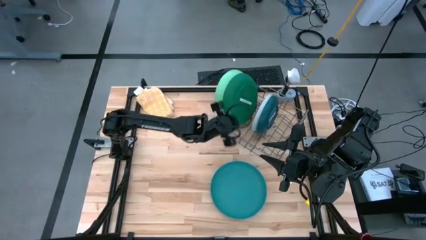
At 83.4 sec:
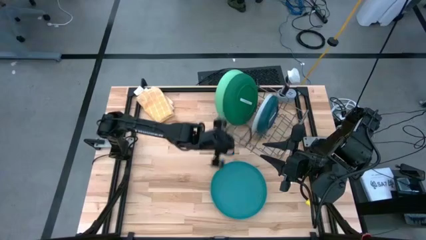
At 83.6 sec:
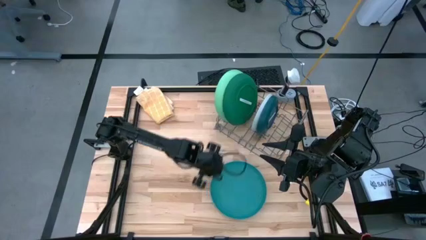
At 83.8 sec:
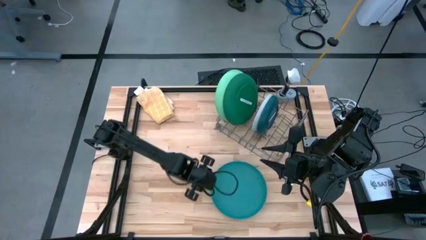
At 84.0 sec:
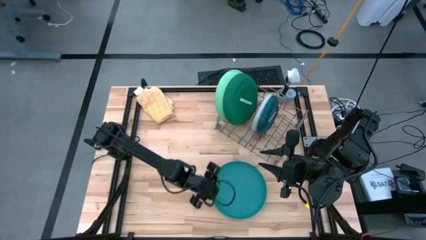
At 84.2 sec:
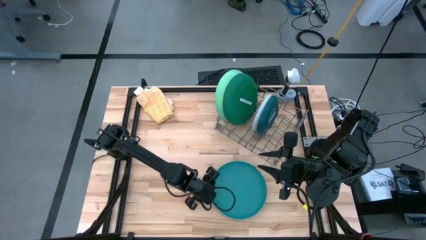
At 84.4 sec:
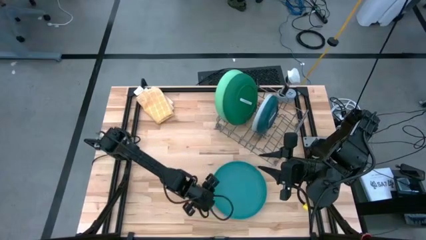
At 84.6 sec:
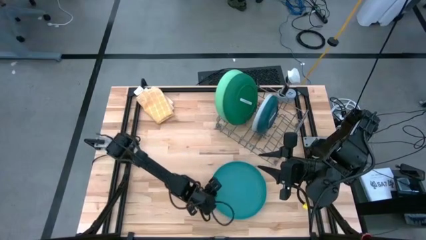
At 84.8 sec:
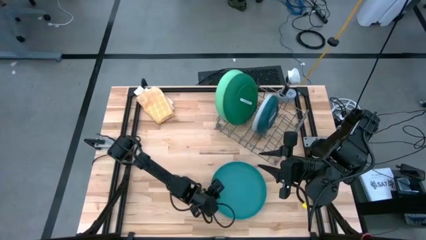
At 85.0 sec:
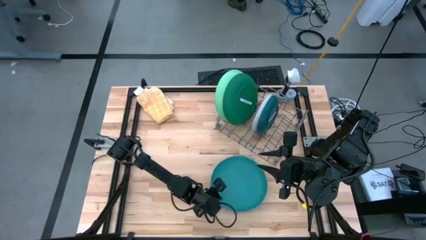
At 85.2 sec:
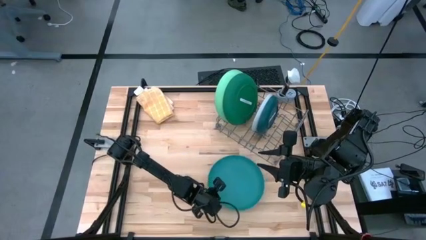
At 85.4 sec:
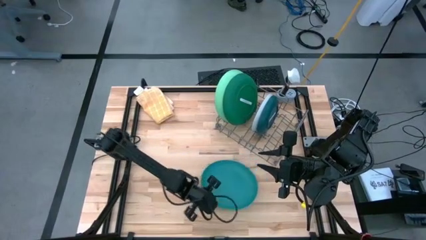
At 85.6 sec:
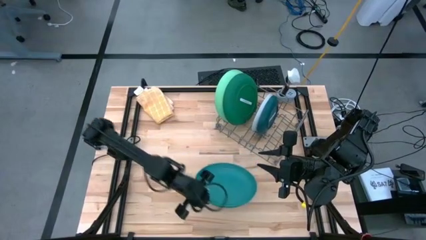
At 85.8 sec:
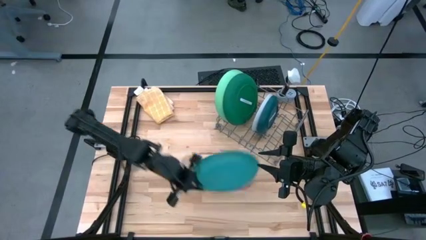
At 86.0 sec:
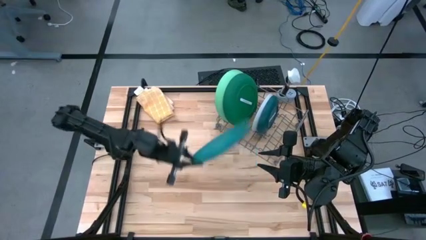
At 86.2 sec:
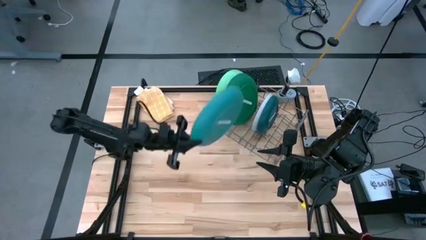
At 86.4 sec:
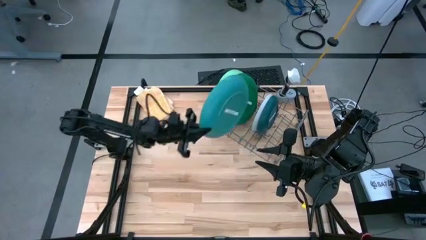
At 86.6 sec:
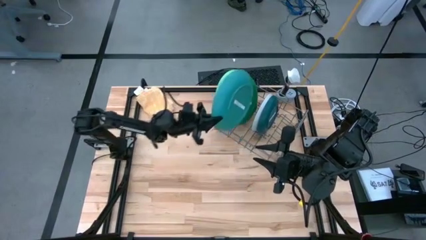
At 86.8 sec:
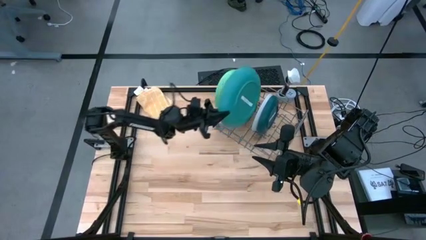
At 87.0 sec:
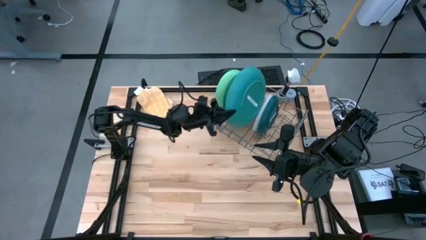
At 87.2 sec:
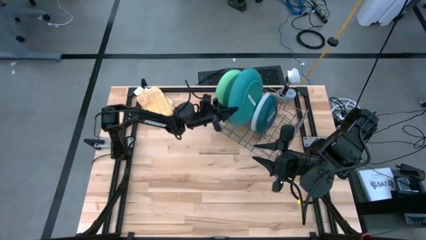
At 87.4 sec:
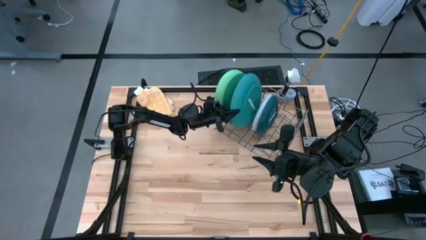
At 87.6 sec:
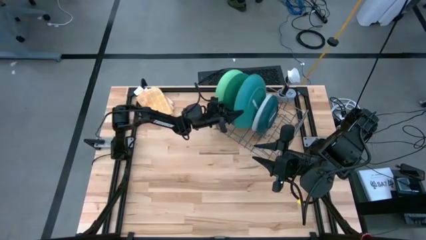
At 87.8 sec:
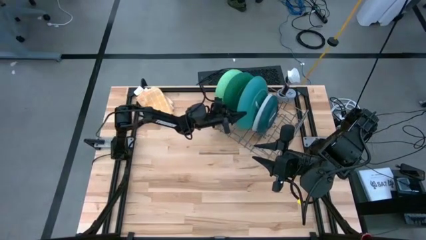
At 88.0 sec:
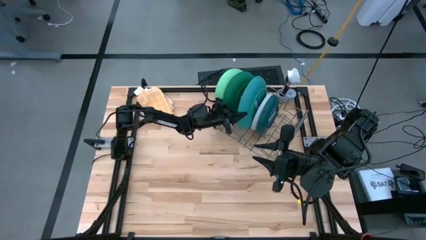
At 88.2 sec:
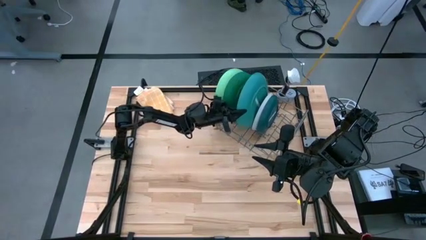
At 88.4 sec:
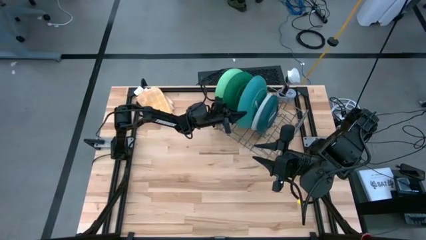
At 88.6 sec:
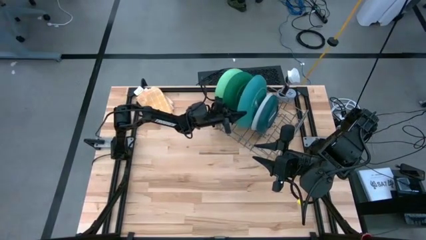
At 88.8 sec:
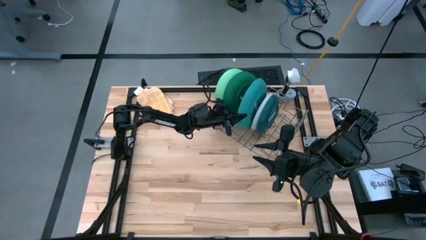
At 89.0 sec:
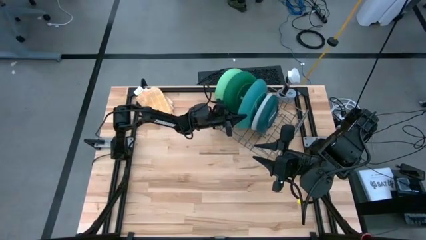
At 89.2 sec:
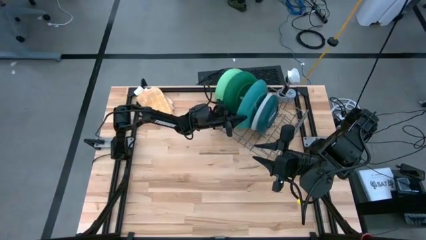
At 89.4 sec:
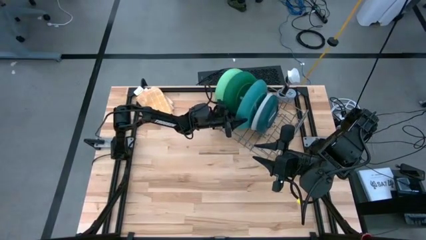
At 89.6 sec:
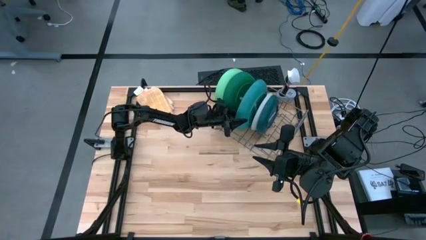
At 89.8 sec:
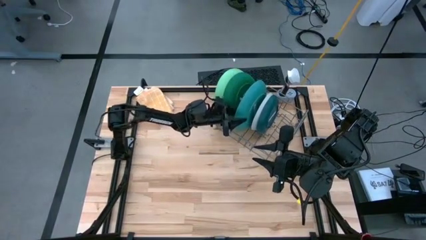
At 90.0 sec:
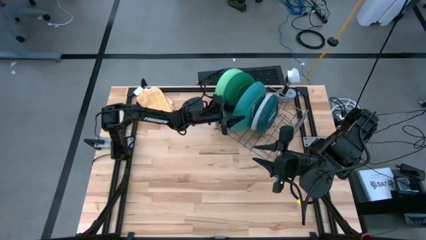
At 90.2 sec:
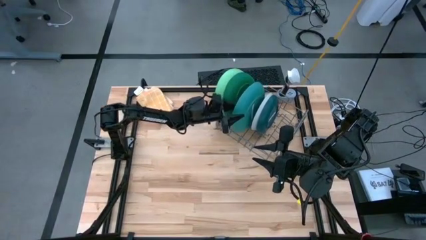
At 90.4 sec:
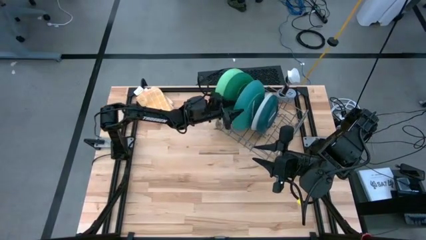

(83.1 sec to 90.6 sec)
Task: Sort dishes
Put the blue plate in the dish rack

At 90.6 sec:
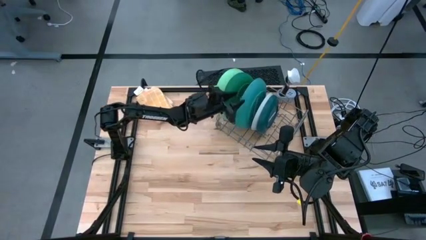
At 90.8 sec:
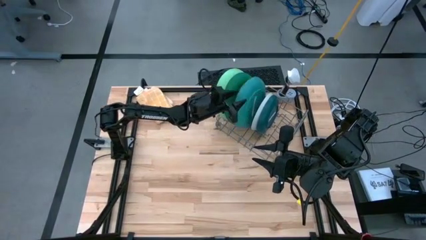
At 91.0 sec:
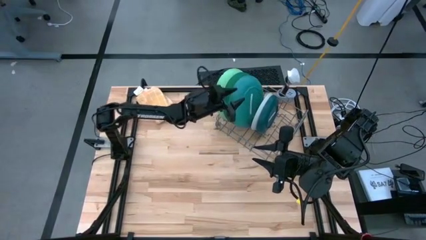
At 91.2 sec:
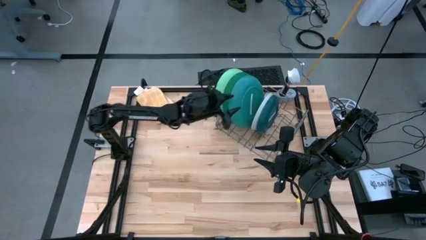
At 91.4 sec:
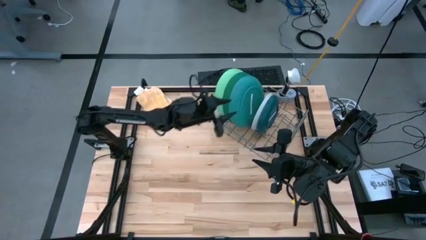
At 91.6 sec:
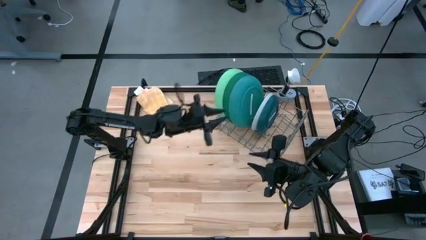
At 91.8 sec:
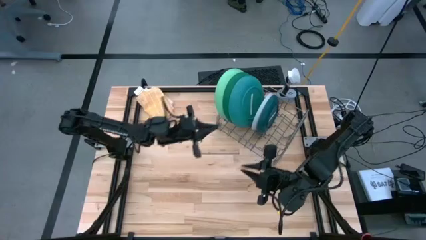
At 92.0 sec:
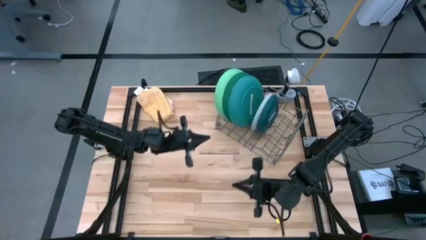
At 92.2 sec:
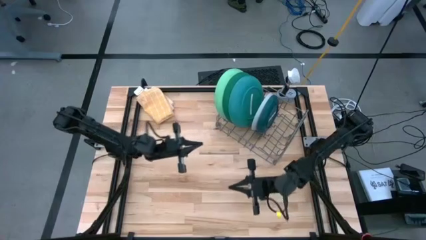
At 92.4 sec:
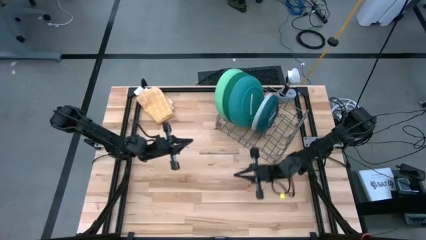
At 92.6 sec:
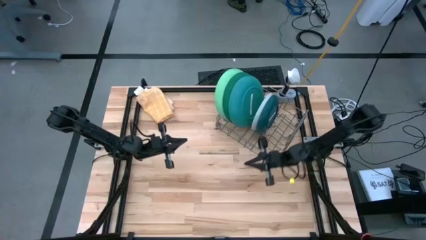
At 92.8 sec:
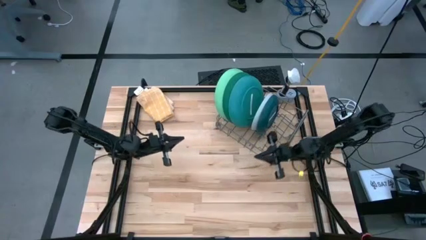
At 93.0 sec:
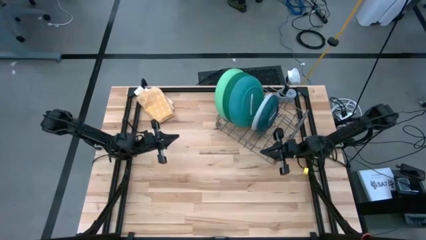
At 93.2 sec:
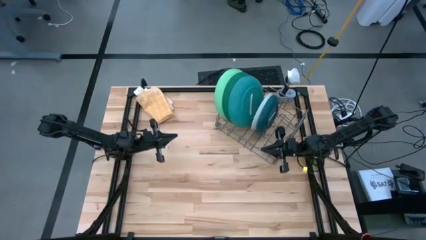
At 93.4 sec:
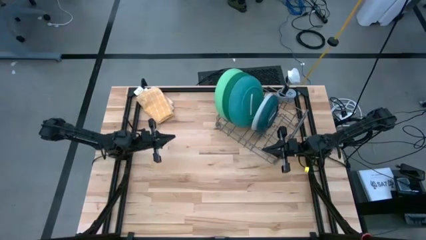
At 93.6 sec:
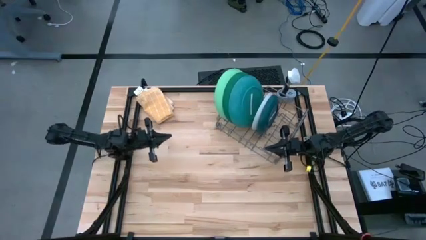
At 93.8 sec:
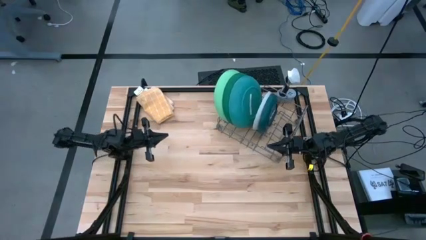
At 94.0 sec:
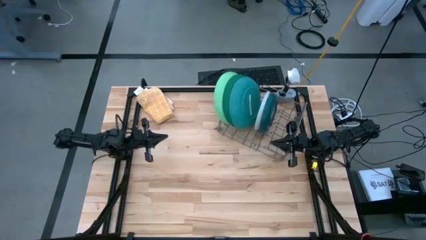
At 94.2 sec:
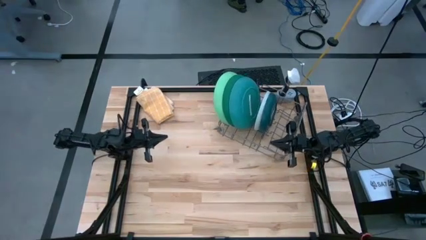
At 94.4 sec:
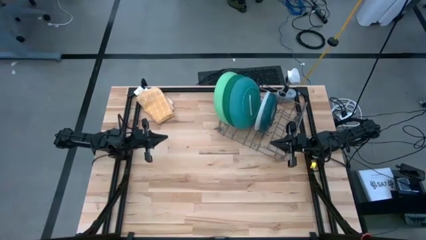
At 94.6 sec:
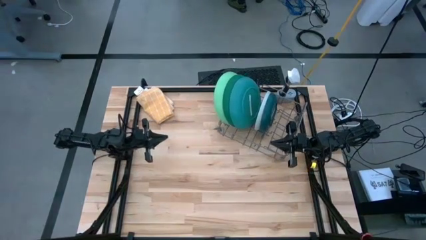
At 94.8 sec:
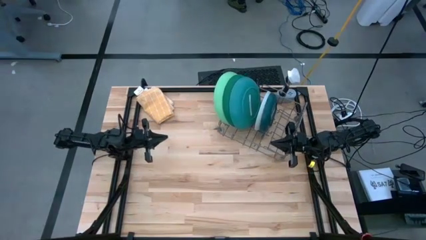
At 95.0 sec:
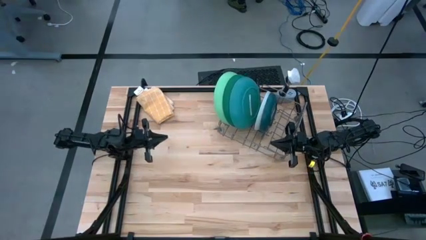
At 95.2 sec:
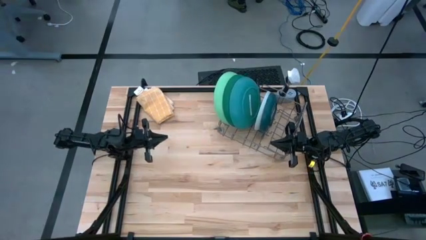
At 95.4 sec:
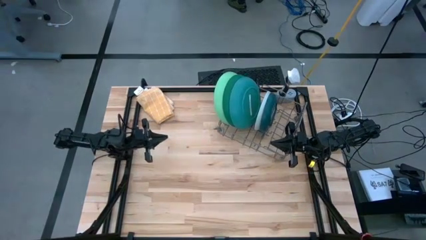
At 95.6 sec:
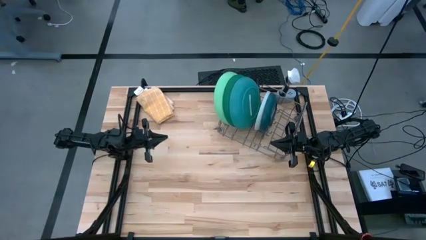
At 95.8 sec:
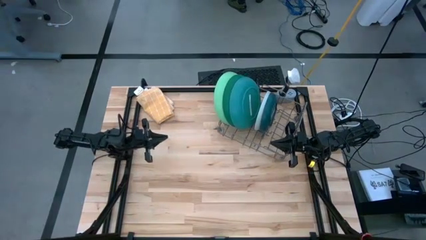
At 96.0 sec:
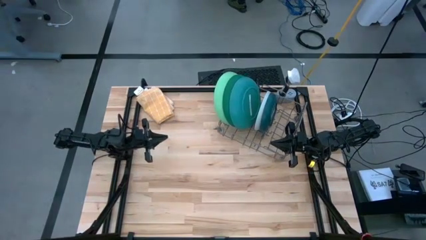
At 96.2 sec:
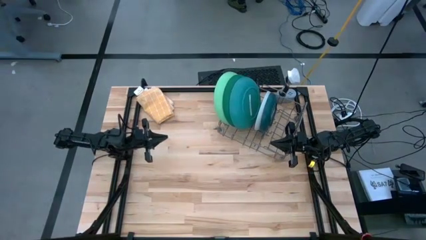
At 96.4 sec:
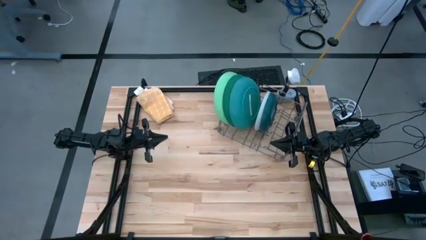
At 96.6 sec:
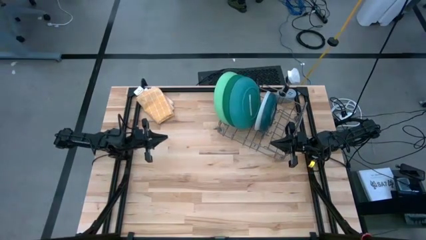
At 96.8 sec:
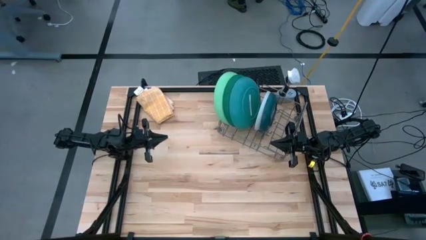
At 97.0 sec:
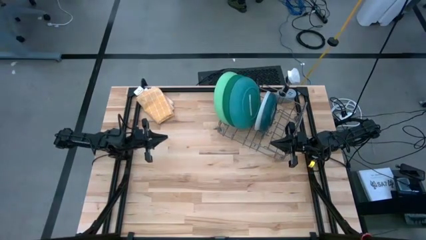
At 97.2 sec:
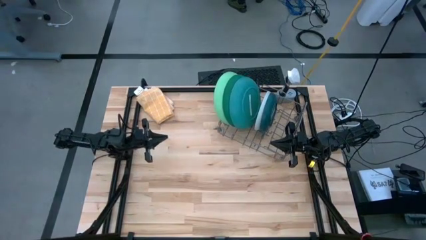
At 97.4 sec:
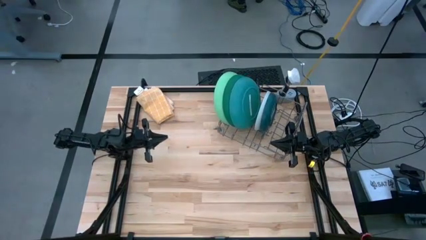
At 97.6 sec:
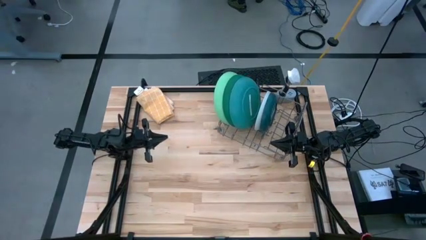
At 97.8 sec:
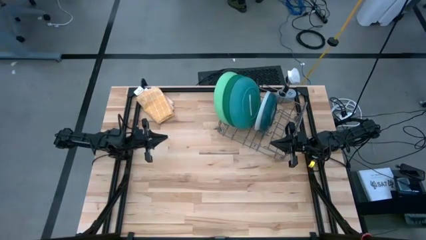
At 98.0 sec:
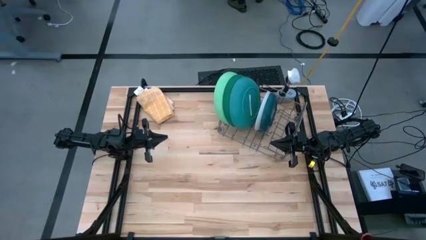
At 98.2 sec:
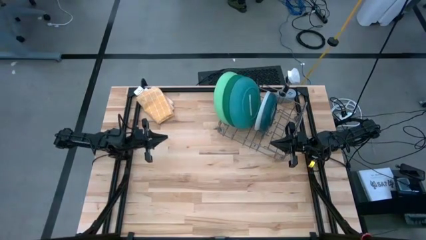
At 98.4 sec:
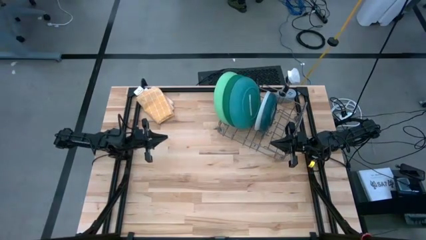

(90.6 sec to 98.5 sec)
Return to Home Position

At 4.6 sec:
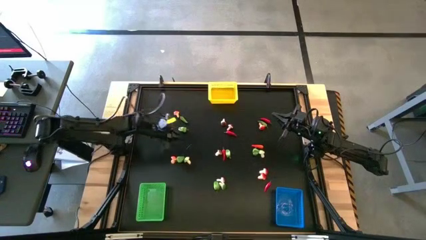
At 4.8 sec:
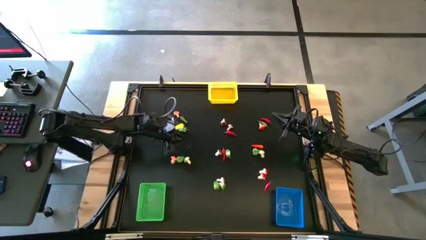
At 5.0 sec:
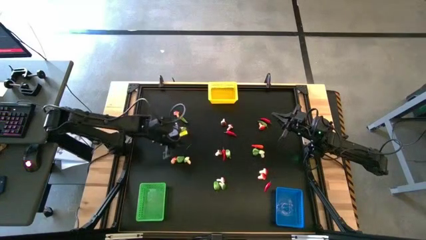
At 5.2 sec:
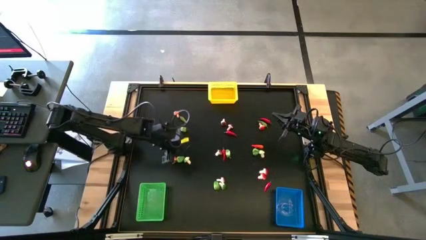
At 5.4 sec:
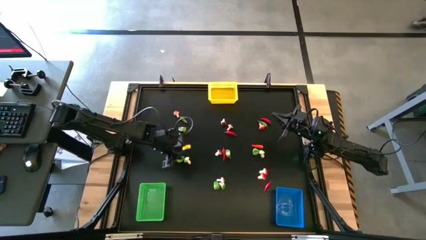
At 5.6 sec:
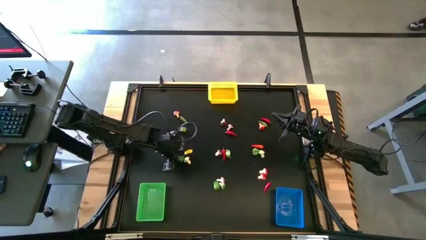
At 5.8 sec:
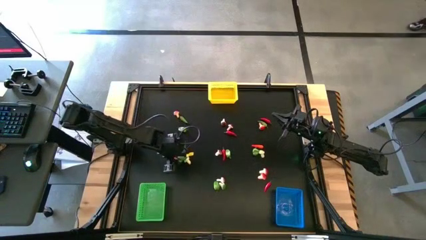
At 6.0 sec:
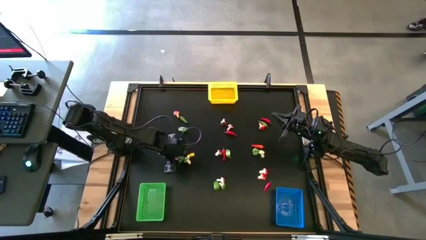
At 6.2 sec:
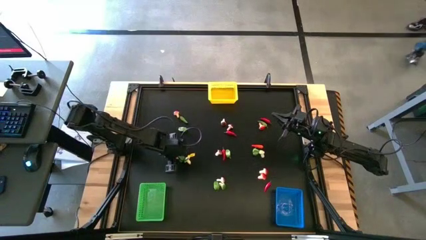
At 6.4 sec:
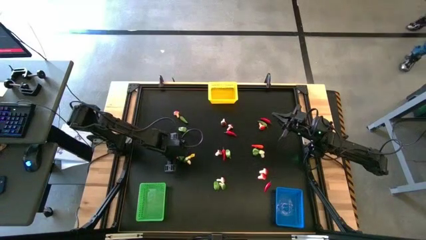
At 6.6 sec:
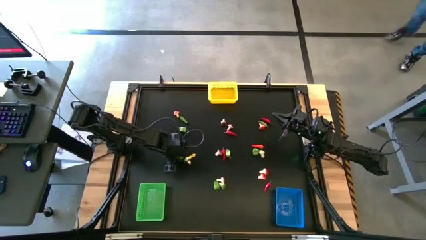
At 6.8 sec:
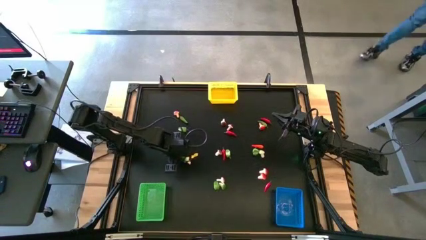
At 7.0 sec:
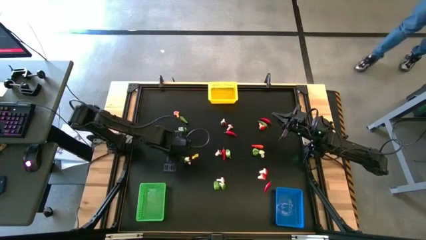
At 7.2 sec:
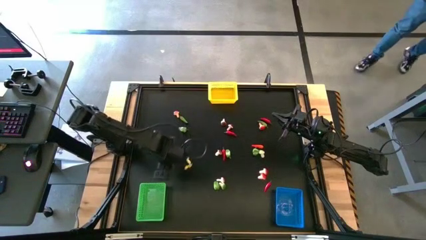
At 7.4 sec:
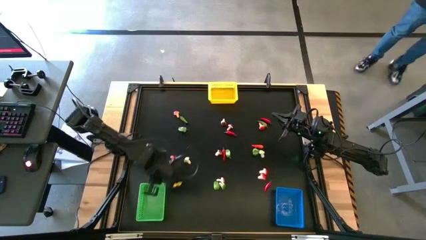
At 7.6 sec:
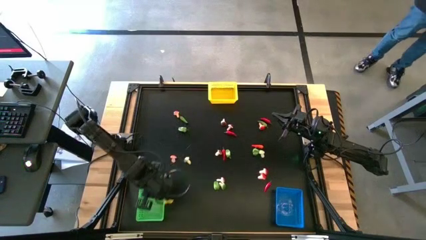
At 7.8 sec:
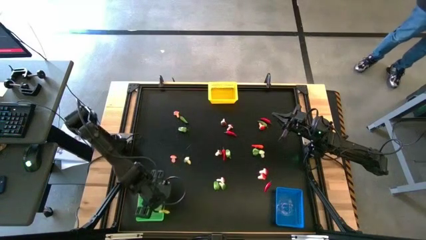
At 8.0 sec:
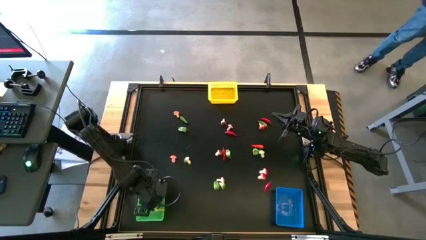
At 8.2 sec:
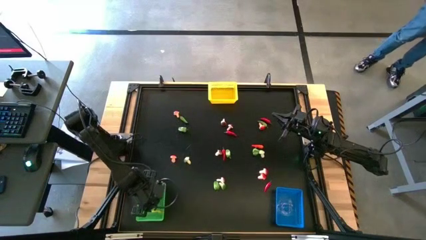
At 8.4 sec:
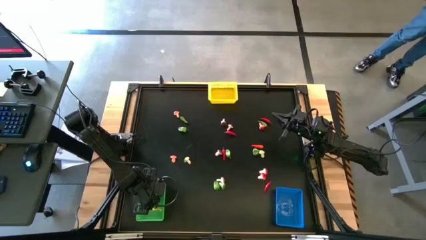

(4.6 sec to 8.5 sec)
Task: Sort produce into baskets
Put the top left green pepper into the green bin
